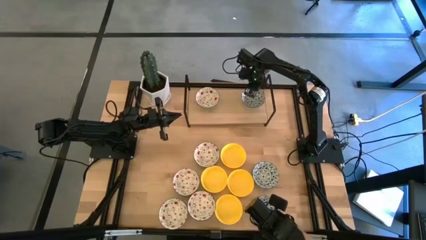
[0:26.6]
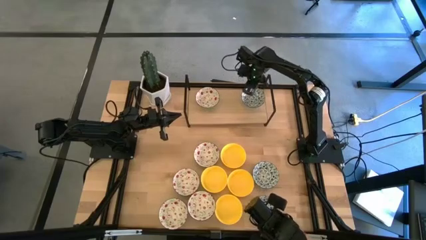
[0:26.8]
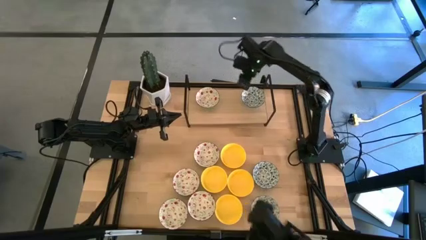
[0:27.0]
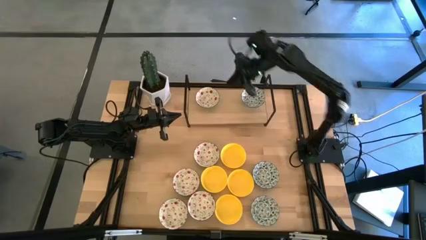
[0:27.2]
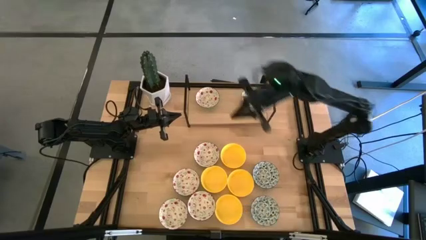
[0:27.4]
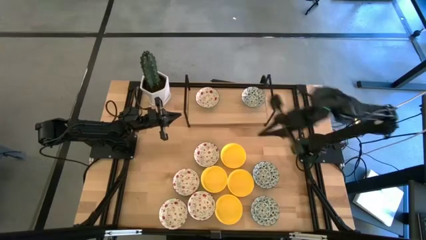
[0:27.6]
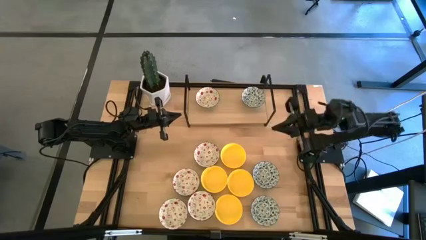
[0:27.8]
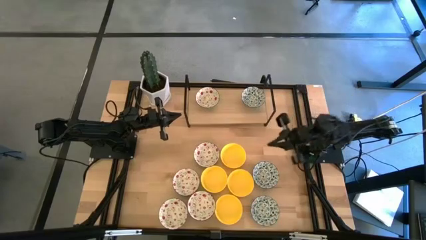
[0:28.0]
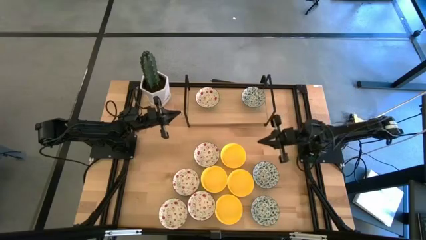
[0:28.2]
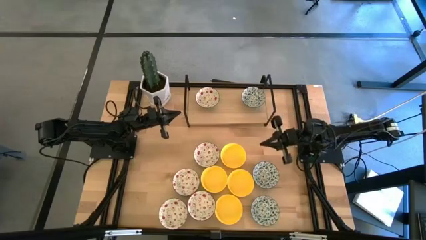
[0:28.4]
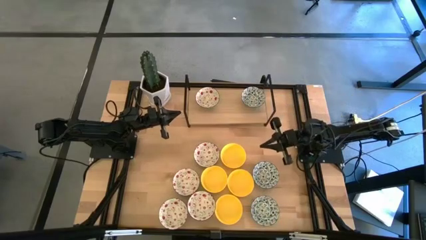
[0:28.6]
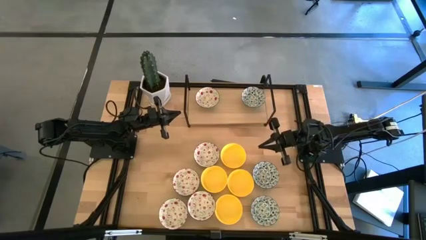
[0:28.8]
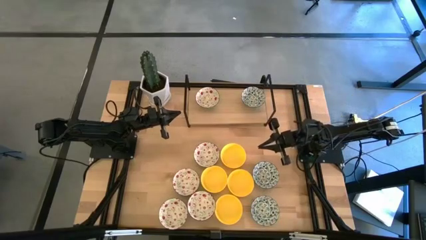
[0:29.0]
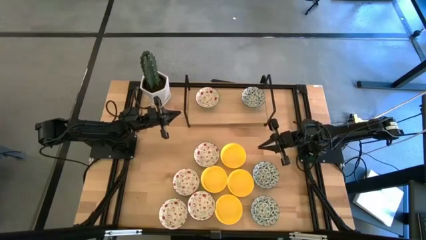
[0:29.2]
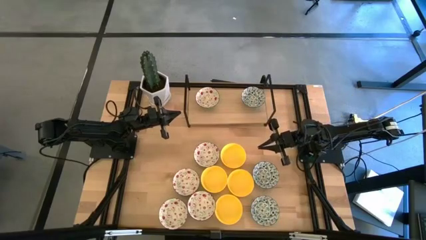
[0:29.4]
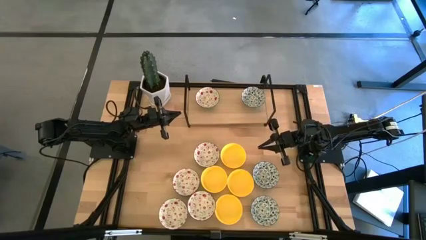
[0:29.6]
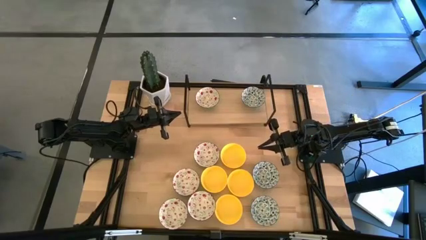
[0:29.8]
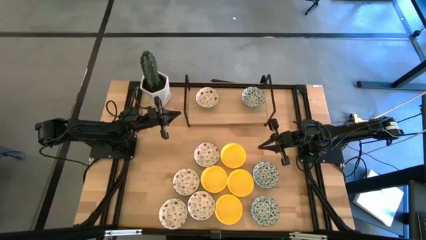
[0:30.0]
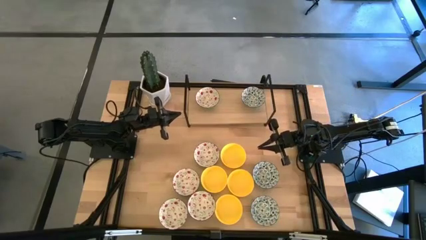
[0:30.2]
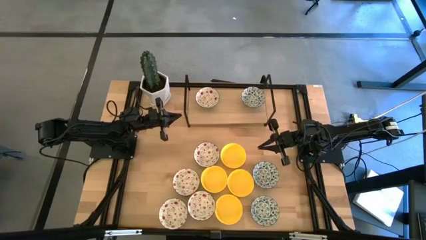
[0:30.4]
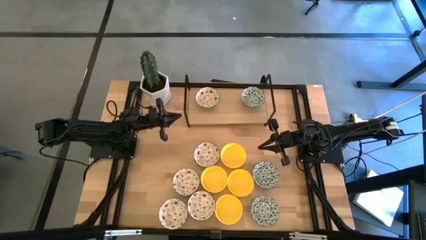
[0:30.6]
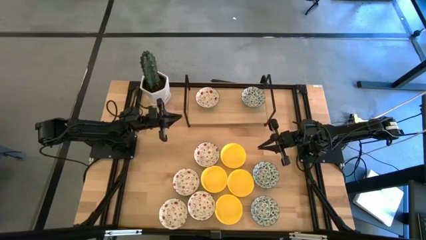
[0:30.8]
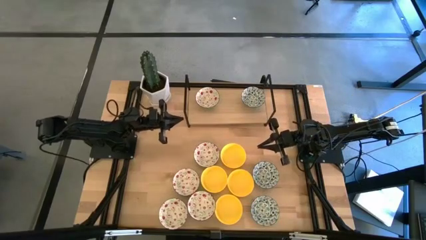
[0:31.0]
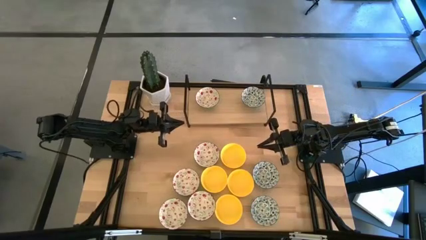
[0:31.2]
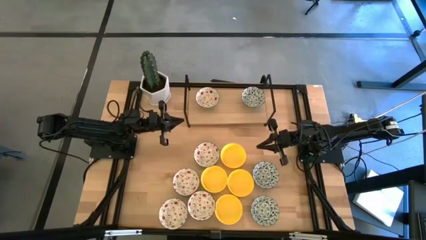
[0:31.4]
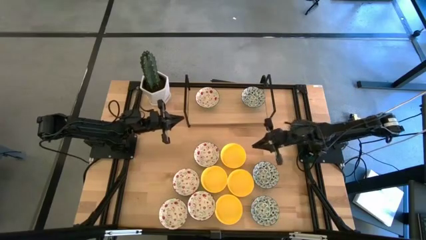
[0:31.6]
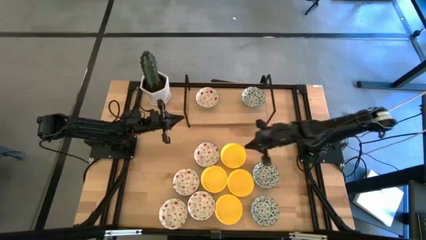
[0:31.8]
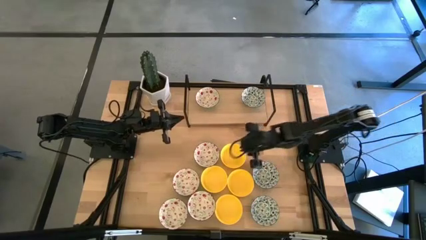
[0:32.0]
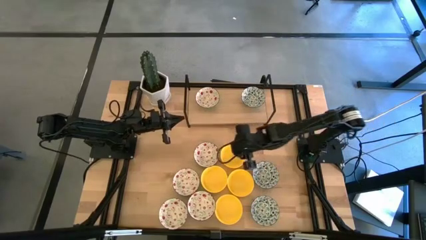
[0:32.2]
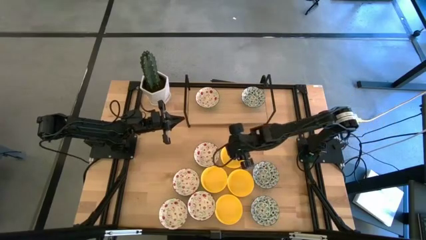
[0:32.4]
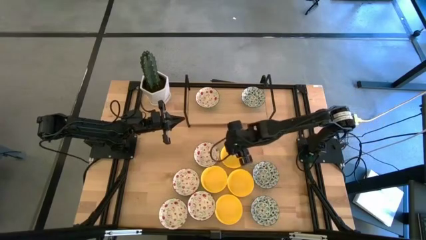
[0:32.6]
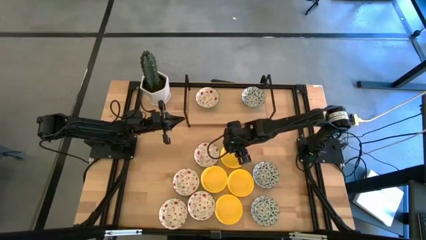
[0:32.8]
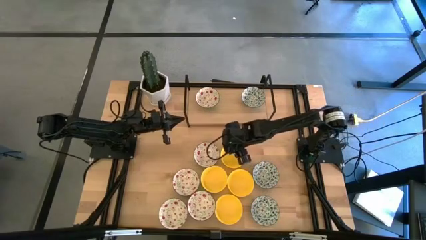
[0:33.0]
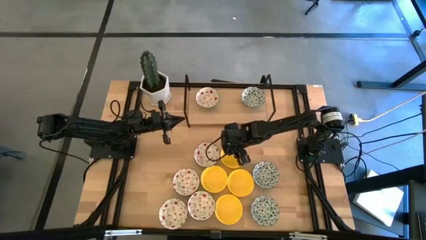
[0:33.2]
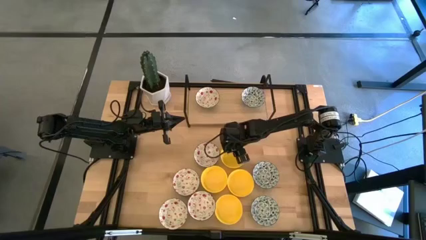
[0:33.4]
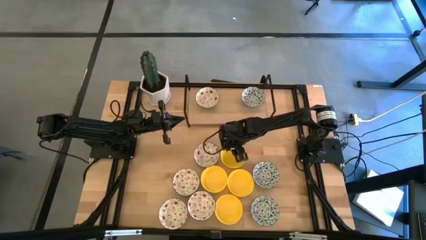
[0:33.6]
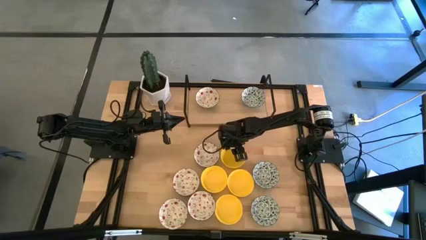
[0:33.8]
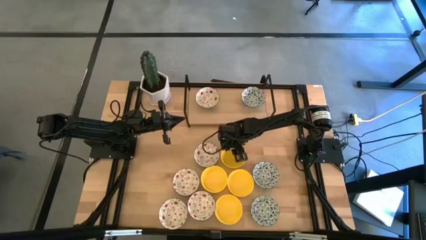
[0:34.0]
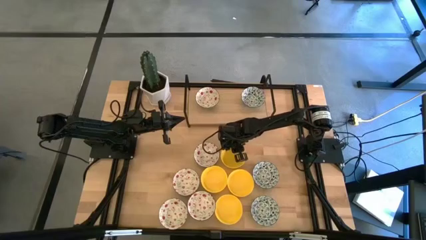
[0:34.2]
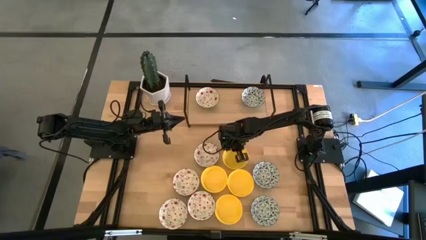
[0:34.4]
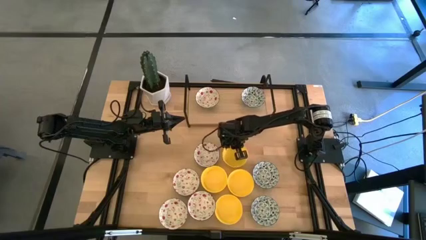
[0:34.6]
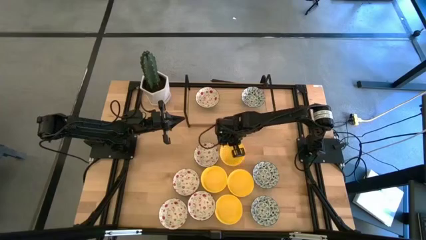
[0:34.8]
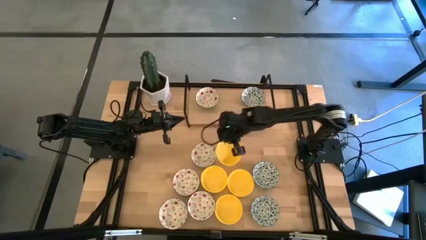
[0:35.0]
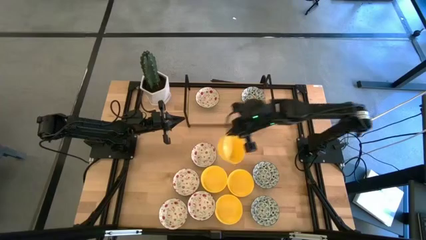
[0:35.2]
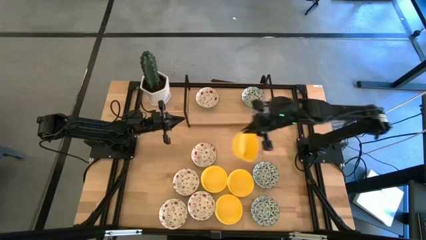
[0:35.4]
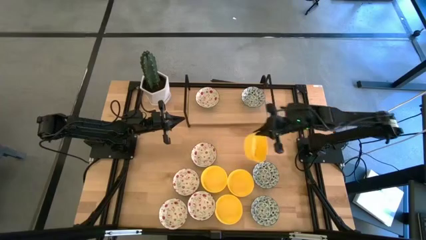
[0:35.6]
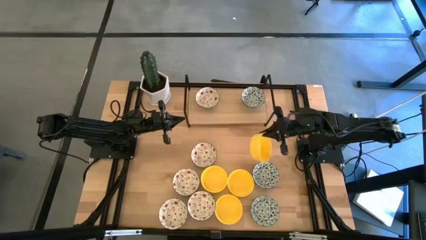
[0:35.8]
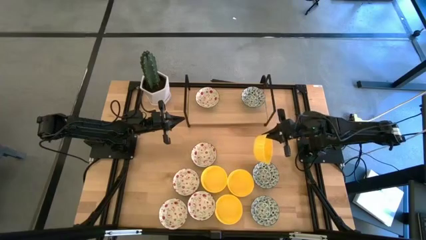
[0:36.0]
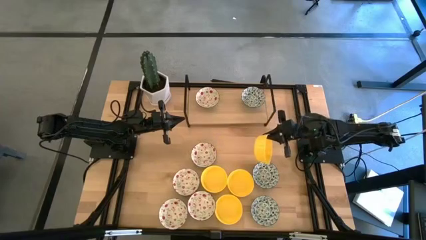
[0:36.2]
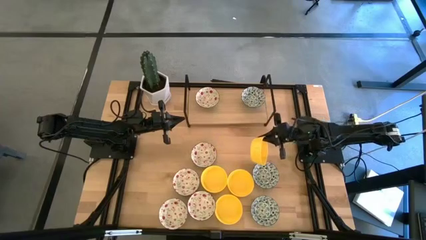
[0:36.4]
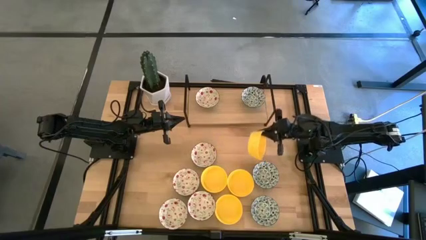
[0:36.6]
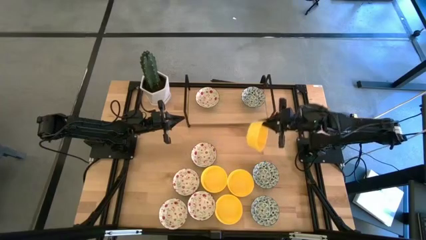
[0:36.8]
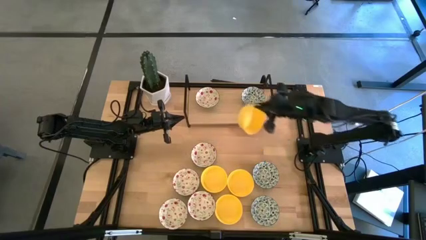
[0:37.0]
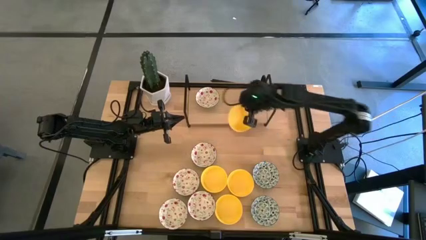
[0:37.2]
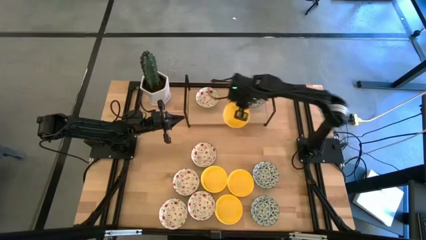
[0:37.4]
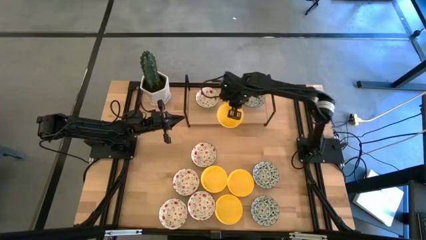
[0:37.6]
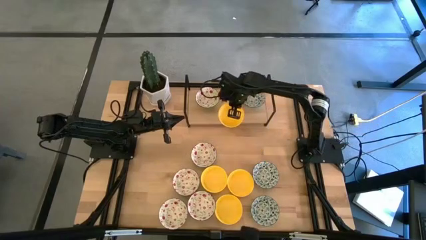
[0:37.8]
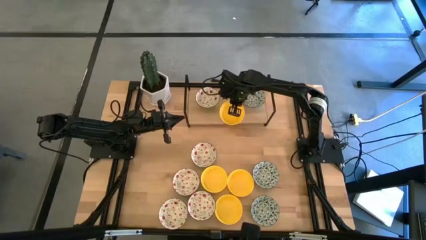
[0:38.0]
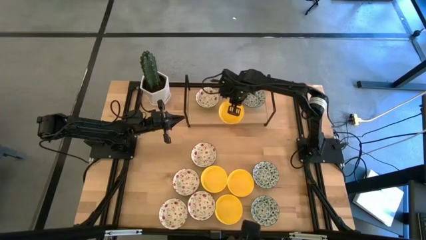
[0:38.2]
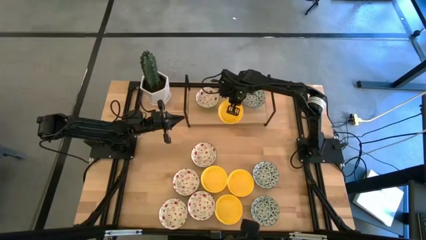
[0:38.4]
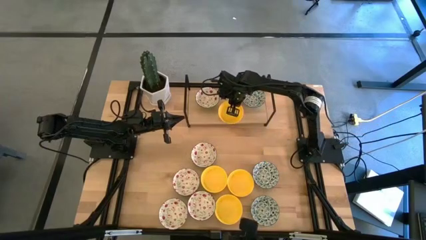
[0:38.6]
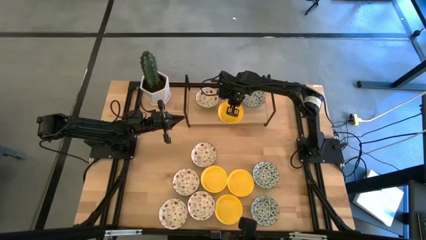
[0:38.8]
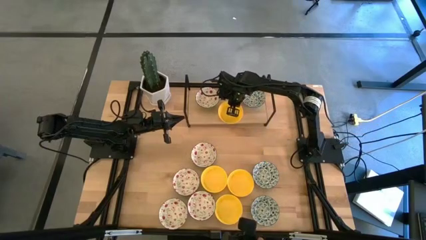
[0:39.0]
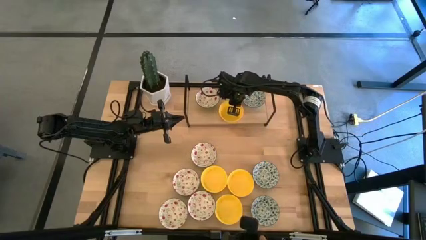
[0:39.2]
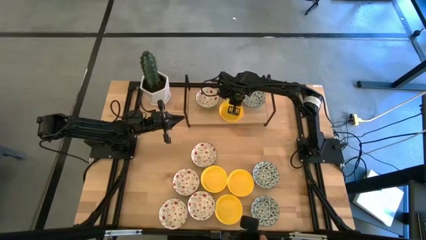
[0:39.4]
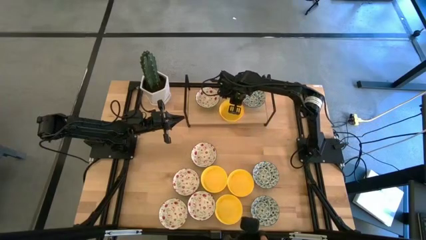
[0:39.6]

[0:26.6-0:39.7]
Task: Pick & Place Mini bowls
Put the yellow bowl on the shelf
